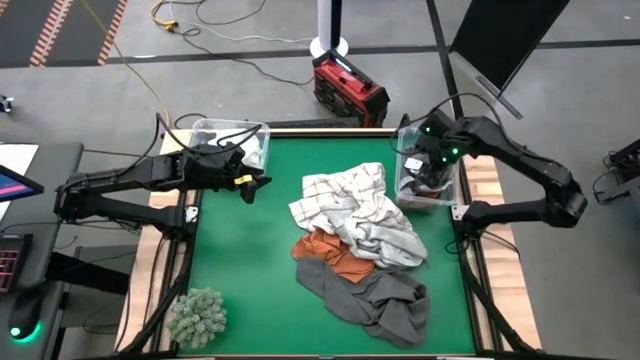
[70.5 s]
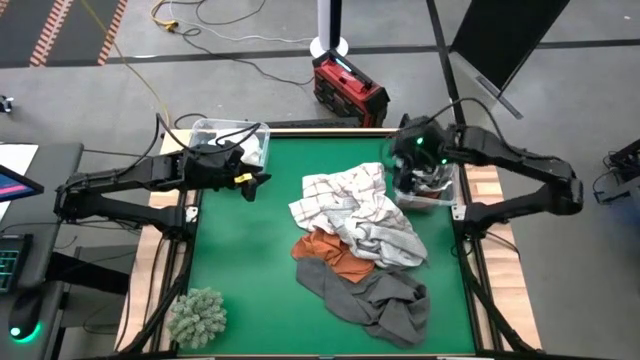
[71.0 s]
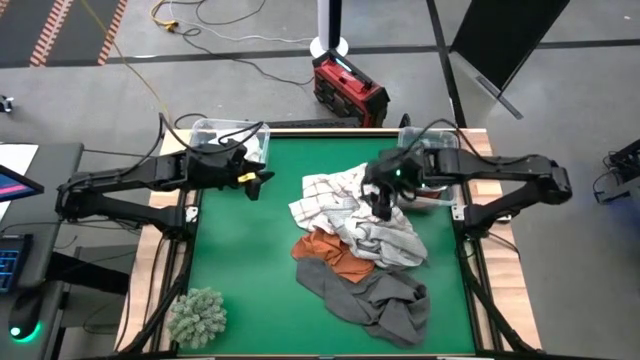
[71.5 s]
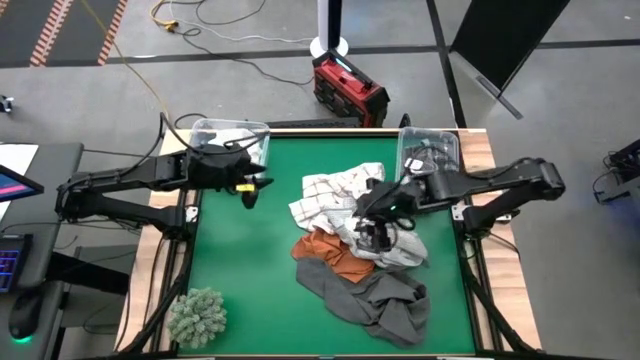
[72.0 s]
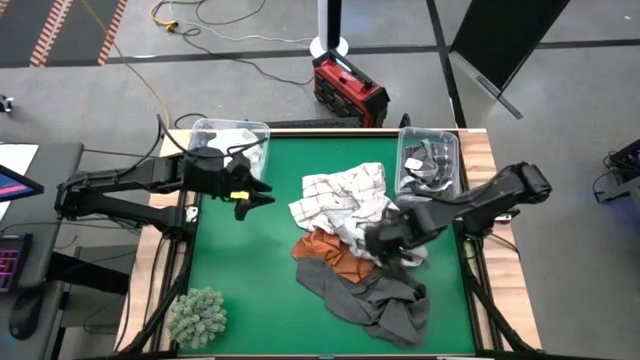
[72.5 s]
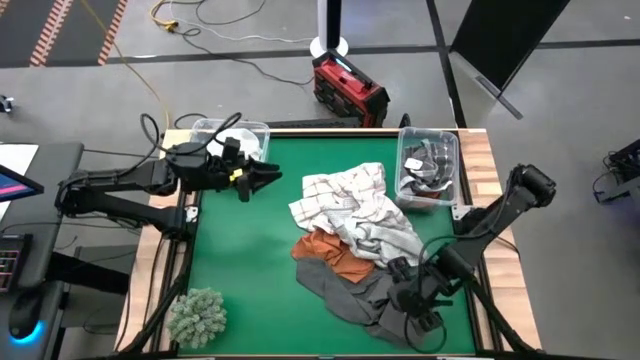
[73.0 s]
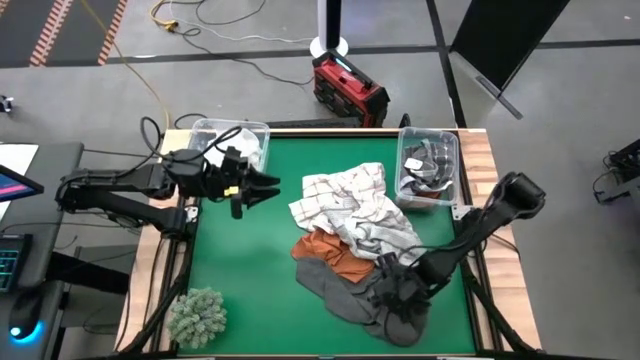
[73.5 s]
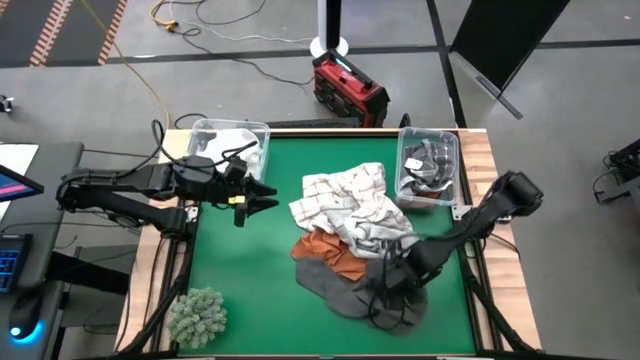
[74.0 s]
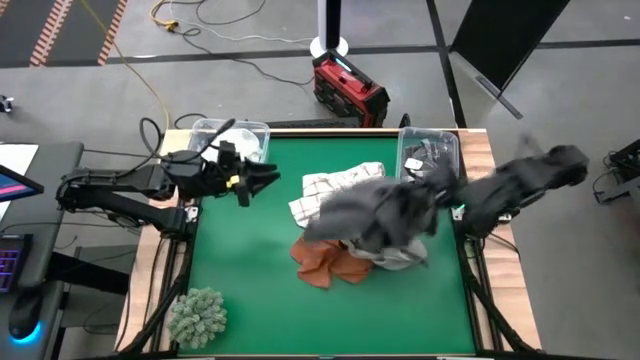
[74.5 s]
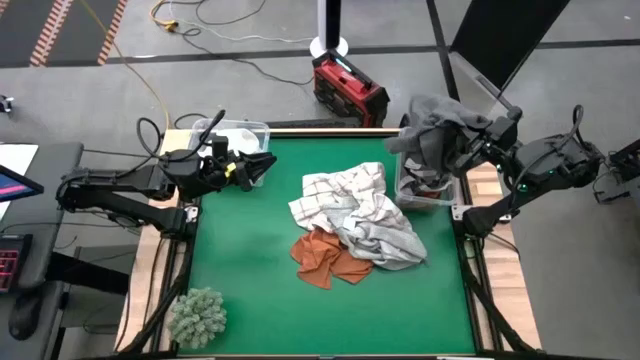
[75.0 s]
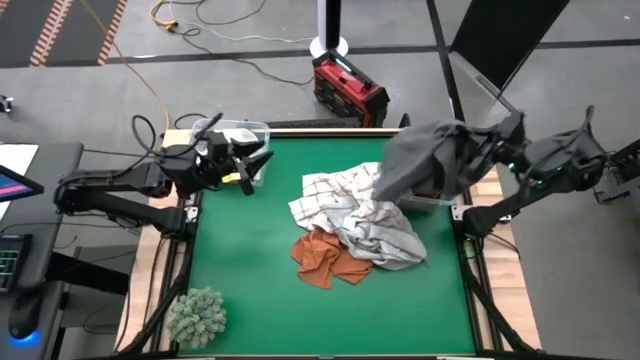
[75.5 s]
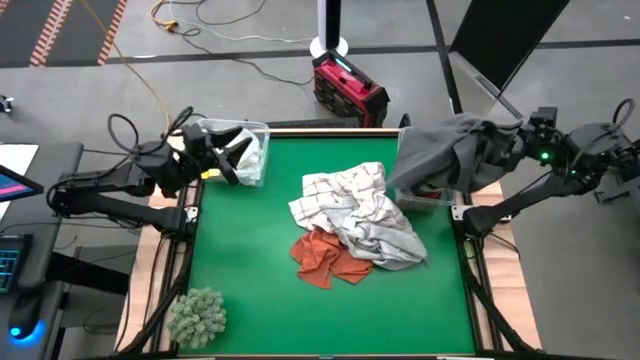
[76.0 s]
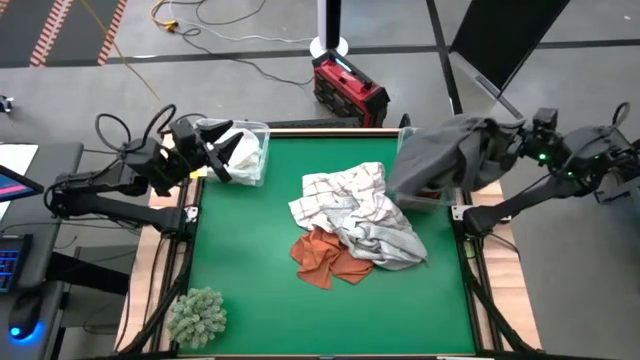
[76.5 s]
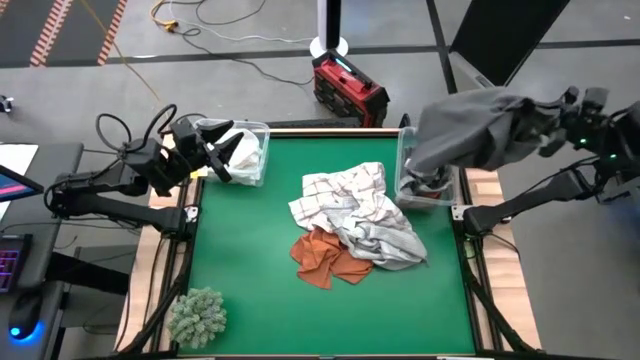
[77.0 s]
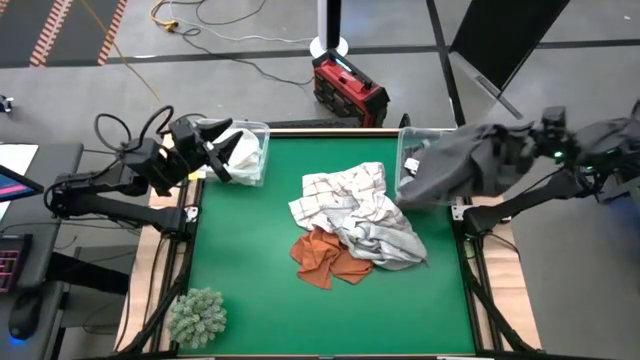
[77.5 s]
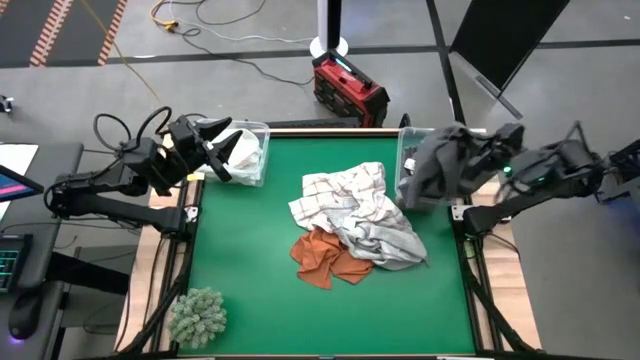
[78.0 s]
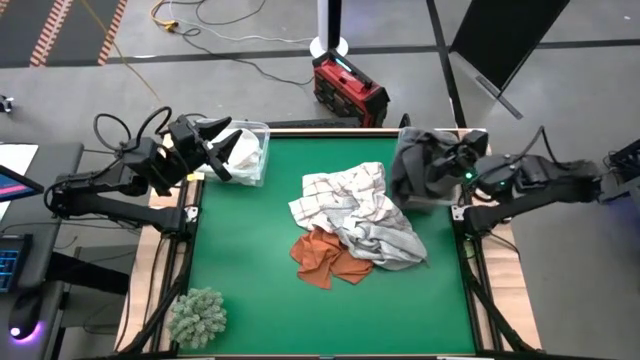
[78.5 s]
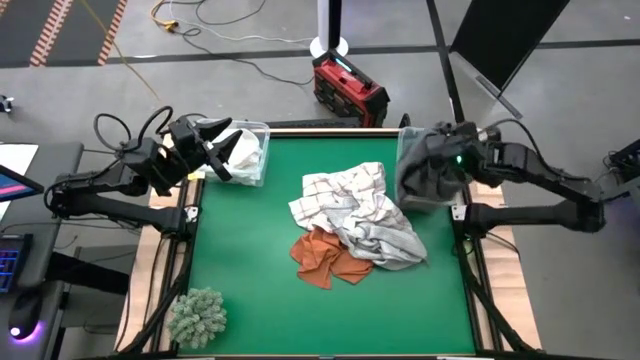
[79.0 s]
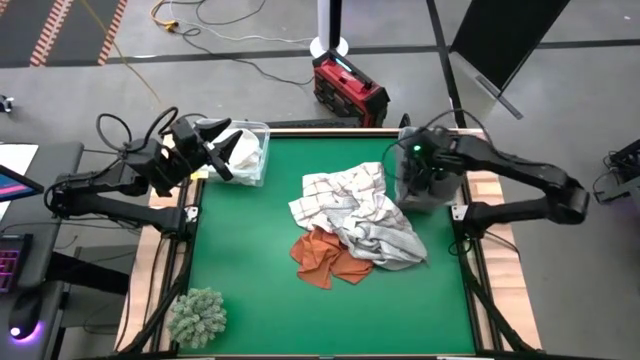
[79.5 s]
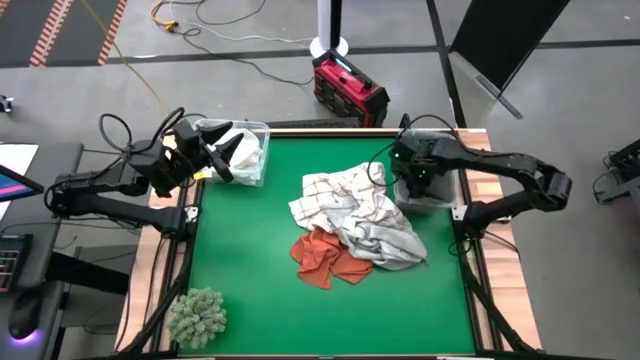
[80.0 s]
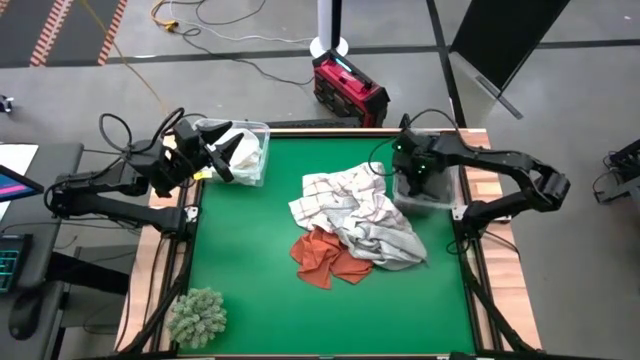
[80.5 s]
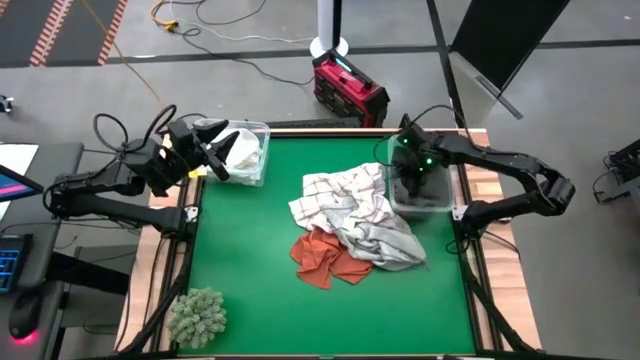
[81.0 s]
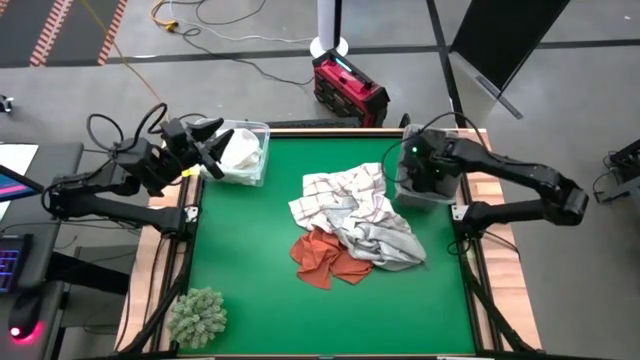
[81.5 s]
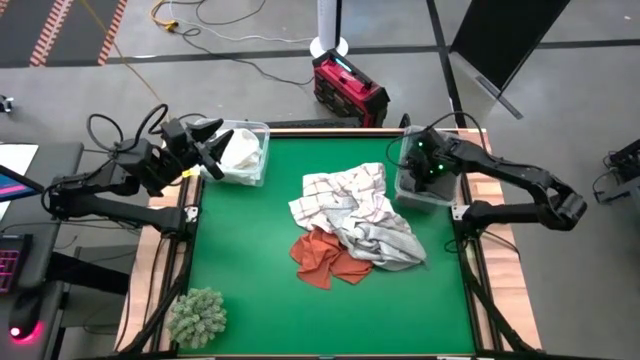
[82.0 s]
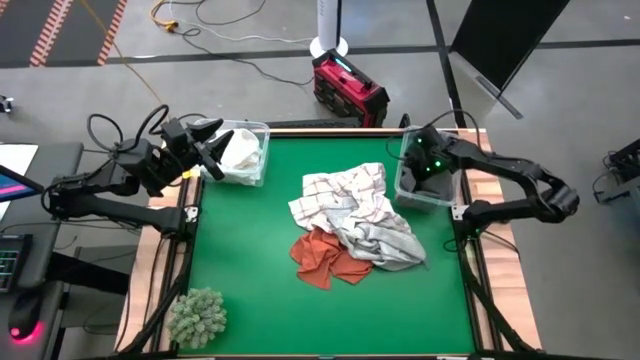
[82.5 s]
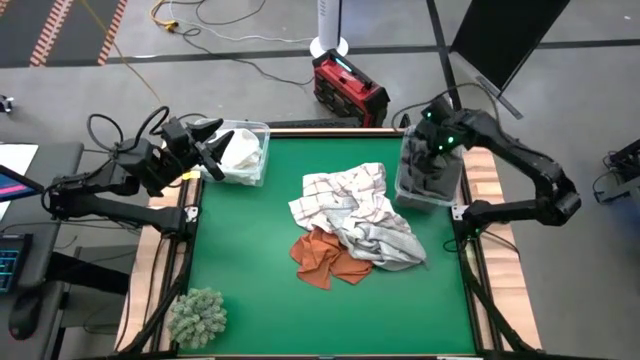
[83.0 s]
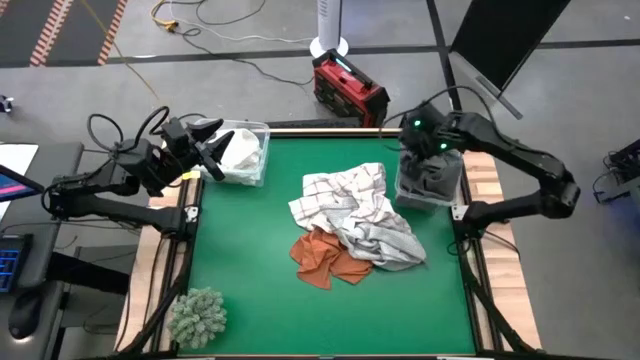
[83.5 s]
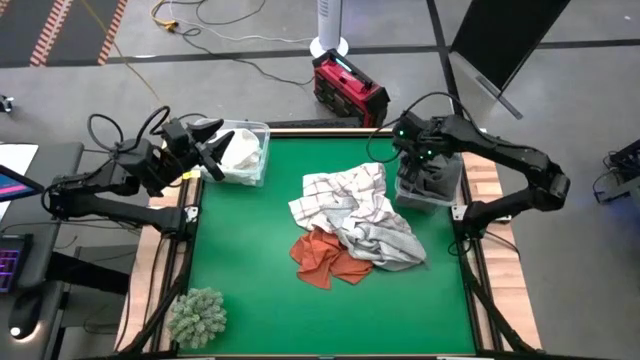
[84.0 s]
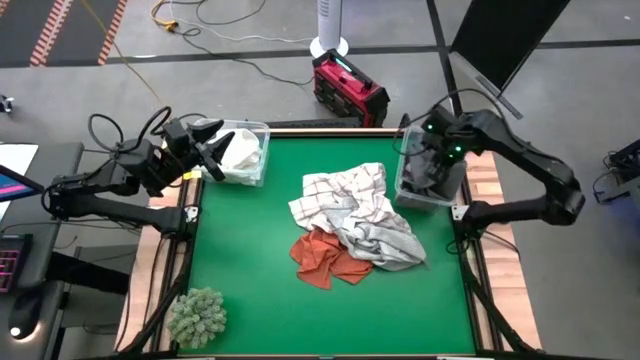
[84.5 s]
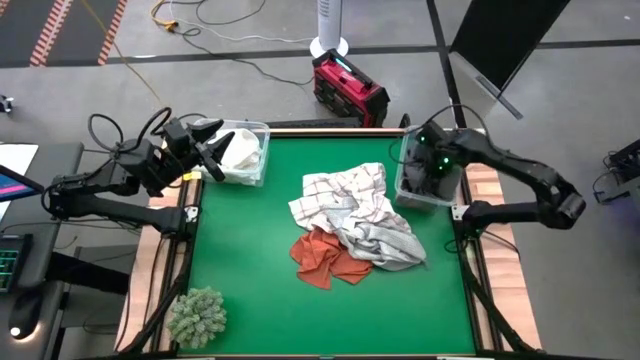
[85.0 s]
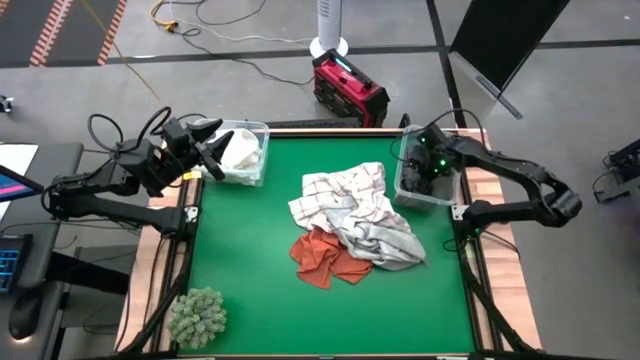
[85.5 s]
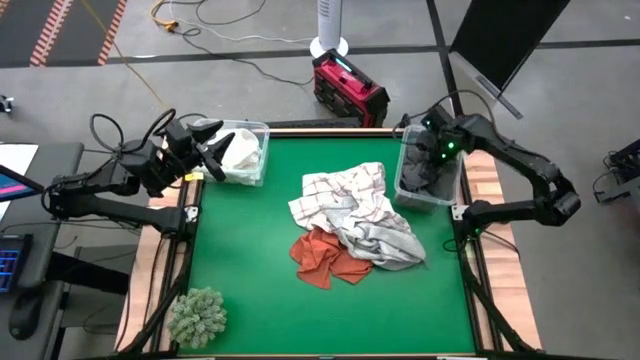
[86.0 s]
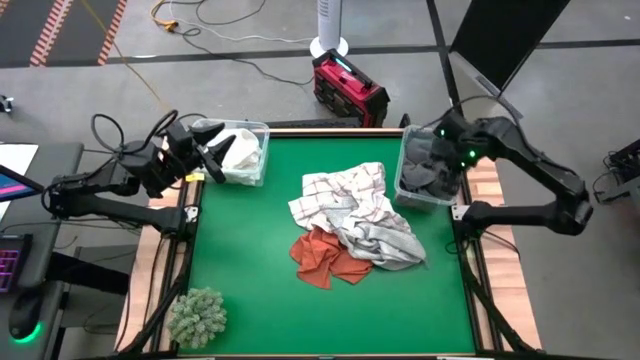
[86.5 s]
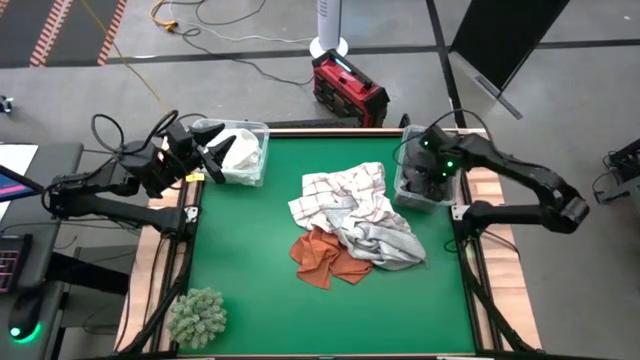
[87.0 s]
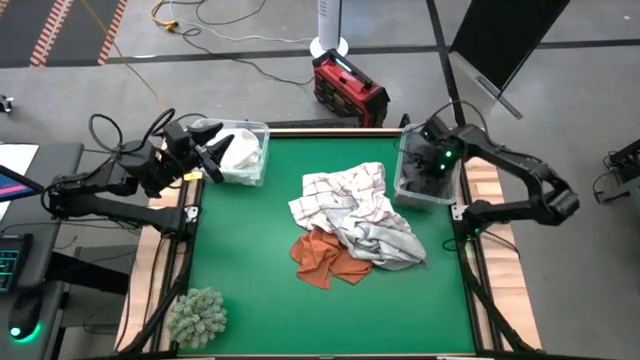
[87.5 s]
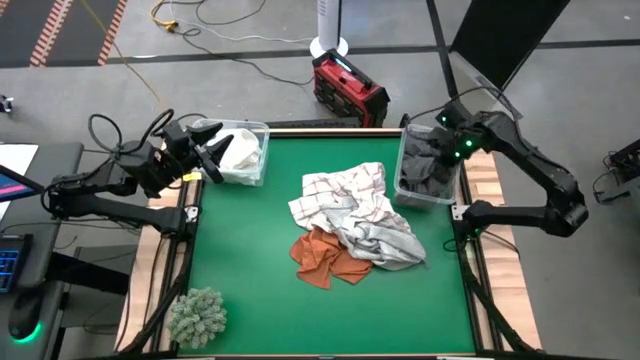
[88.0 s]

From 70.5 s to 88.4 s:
Task: Sort towels by color in basket
Put the dark gray towel into the right transparent bin
